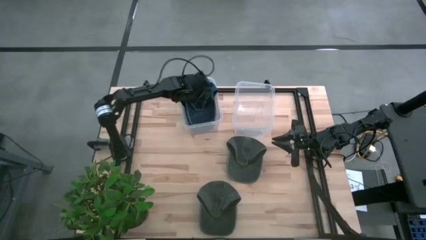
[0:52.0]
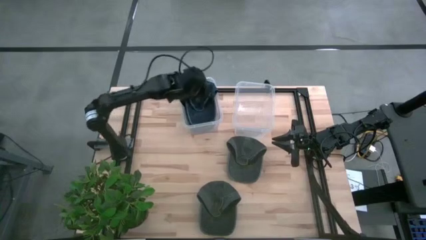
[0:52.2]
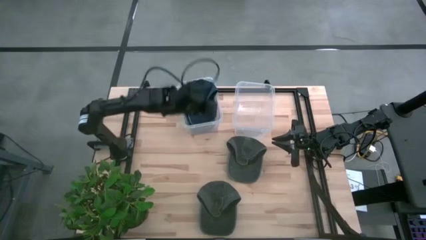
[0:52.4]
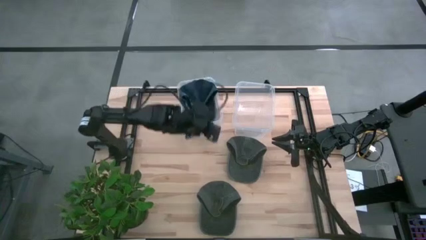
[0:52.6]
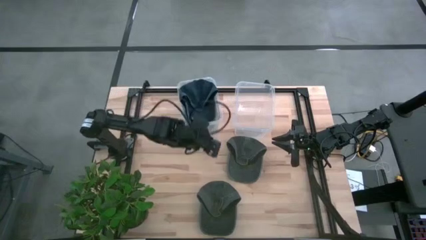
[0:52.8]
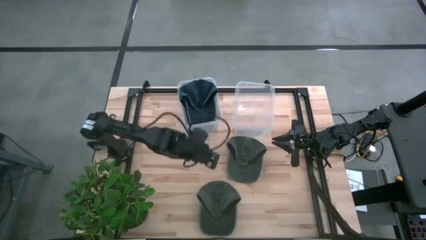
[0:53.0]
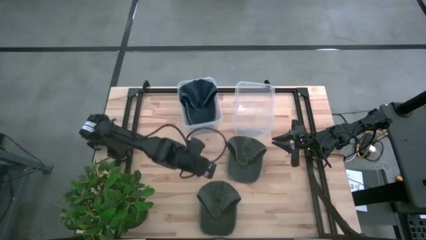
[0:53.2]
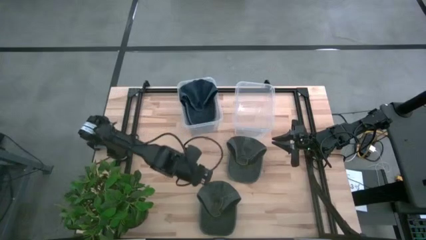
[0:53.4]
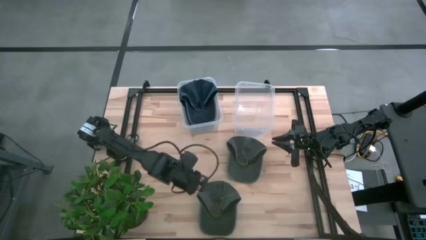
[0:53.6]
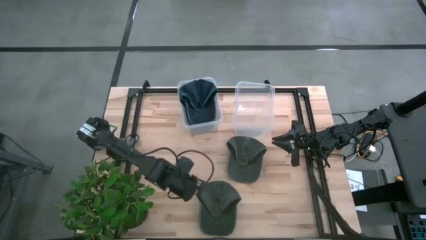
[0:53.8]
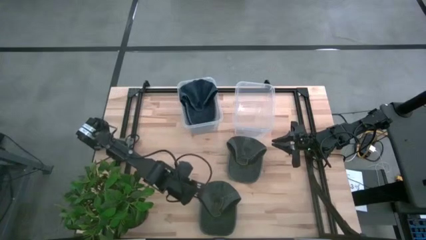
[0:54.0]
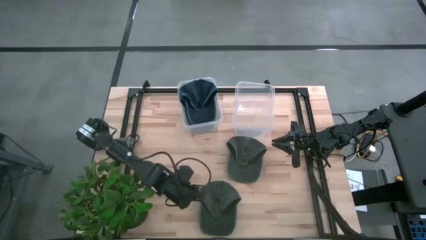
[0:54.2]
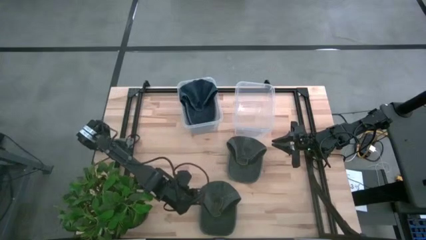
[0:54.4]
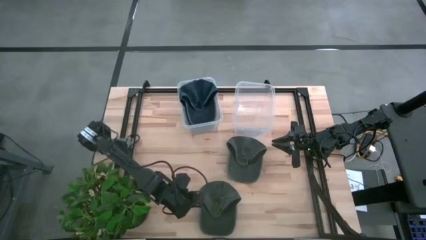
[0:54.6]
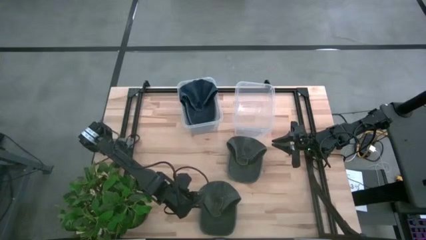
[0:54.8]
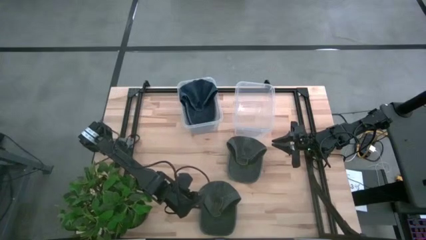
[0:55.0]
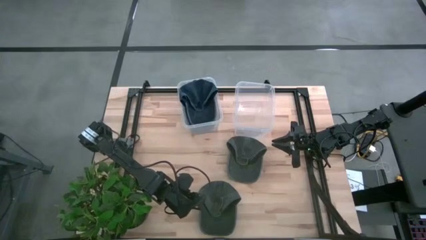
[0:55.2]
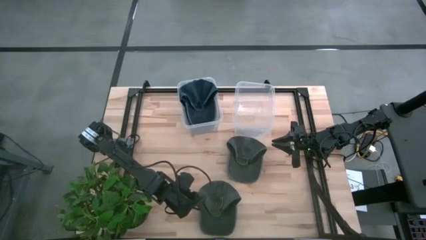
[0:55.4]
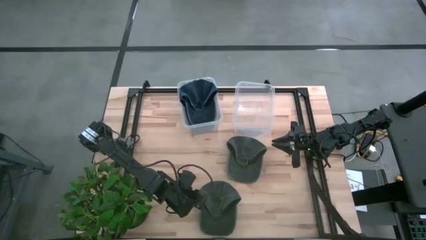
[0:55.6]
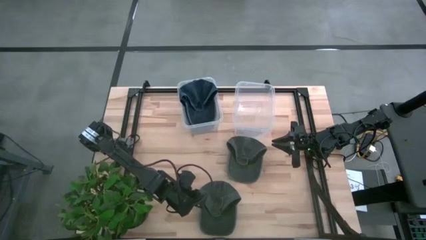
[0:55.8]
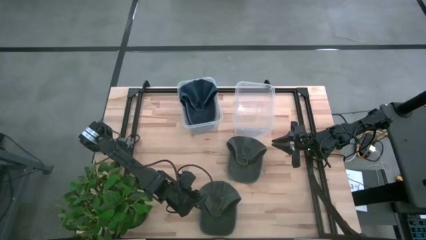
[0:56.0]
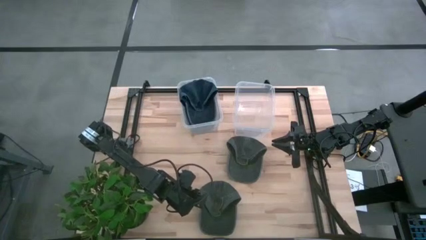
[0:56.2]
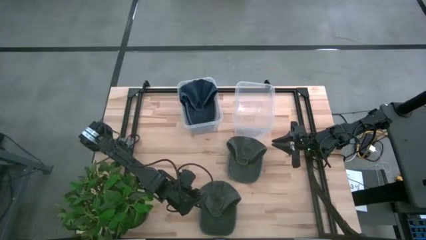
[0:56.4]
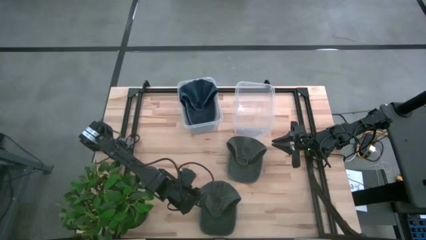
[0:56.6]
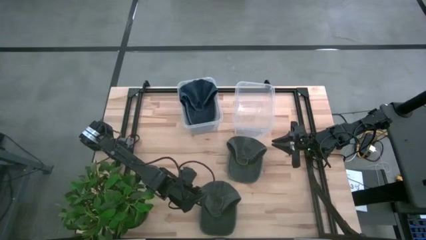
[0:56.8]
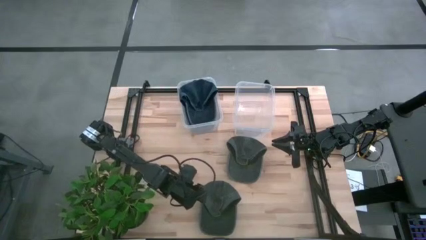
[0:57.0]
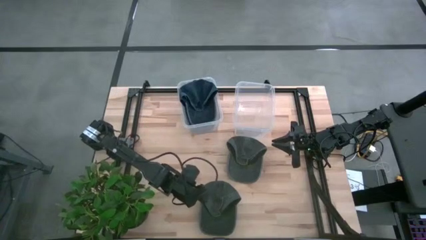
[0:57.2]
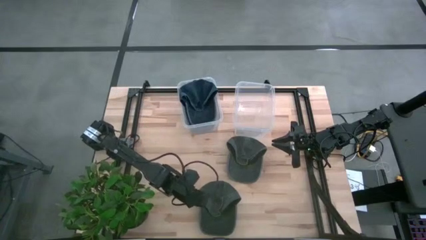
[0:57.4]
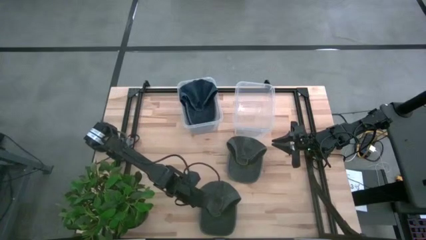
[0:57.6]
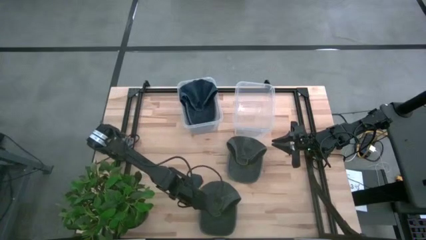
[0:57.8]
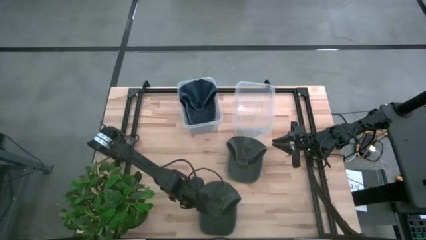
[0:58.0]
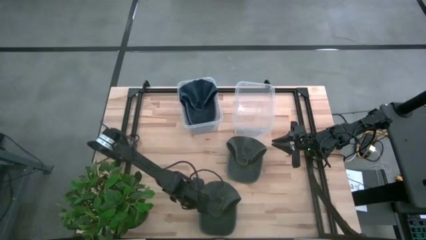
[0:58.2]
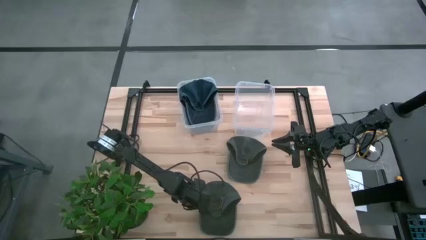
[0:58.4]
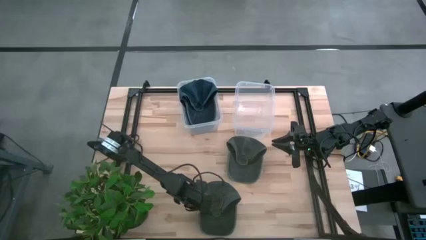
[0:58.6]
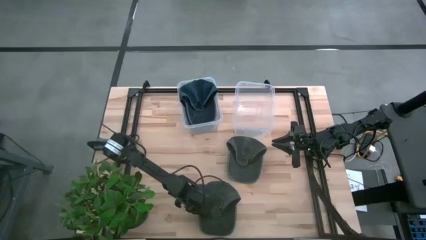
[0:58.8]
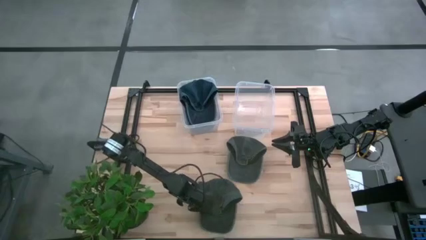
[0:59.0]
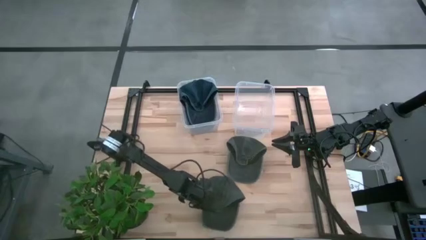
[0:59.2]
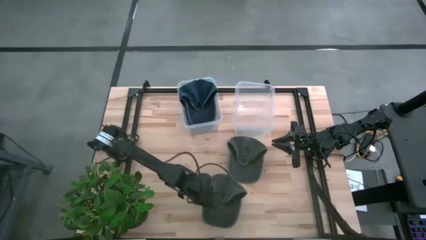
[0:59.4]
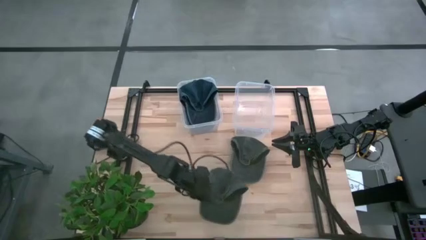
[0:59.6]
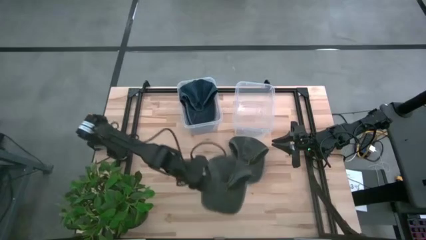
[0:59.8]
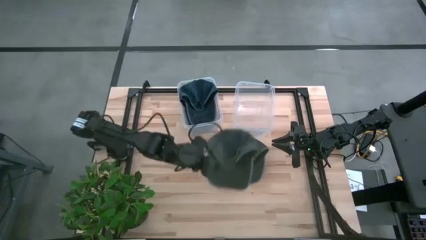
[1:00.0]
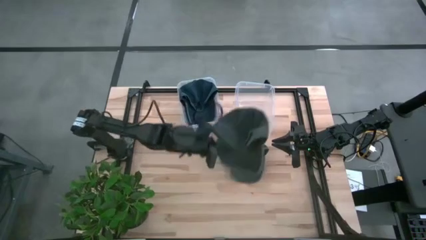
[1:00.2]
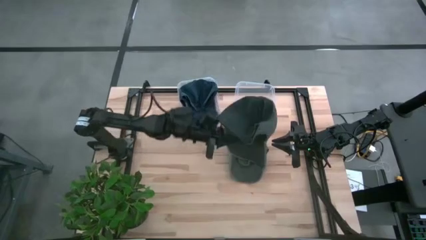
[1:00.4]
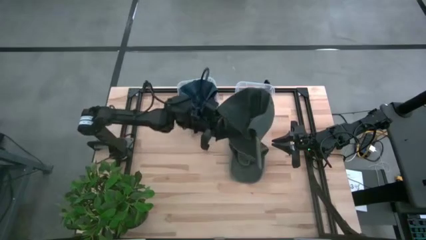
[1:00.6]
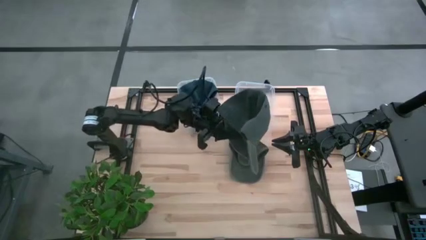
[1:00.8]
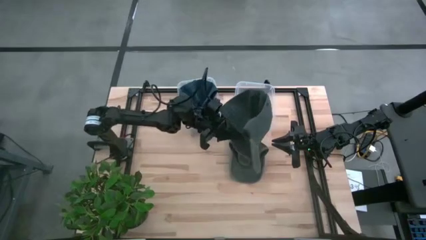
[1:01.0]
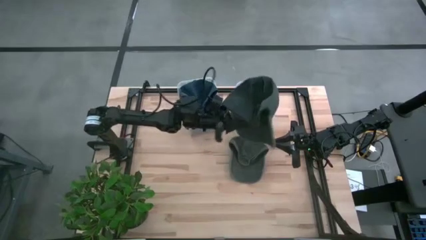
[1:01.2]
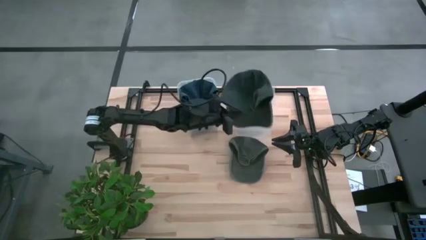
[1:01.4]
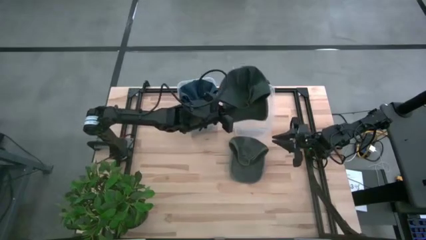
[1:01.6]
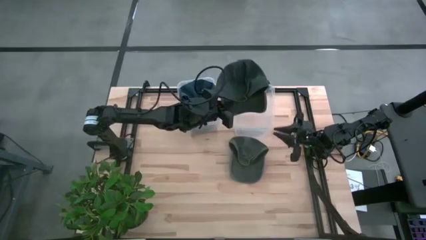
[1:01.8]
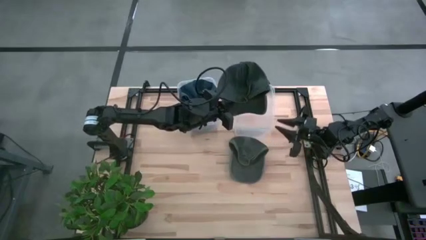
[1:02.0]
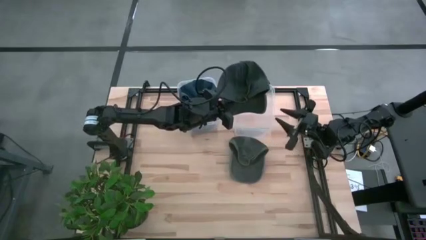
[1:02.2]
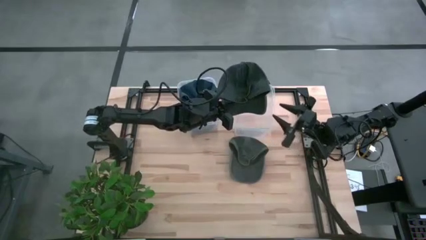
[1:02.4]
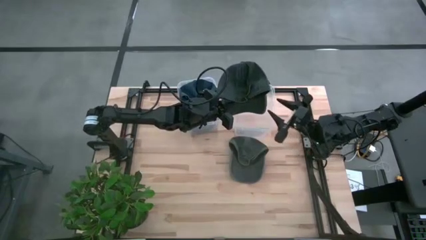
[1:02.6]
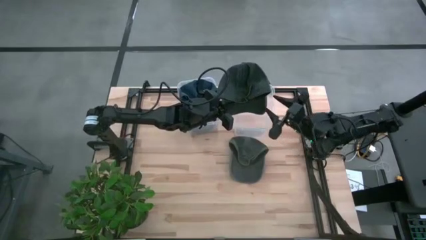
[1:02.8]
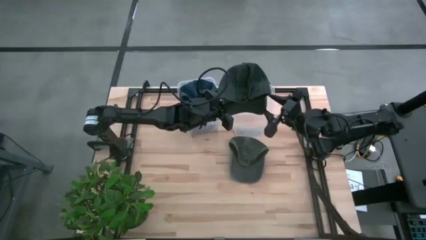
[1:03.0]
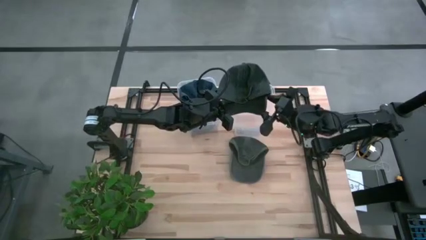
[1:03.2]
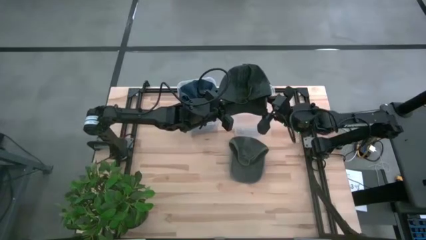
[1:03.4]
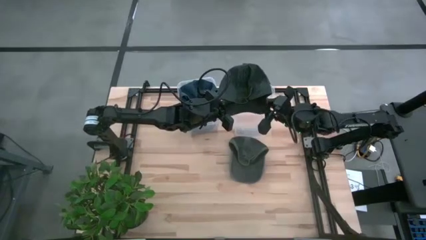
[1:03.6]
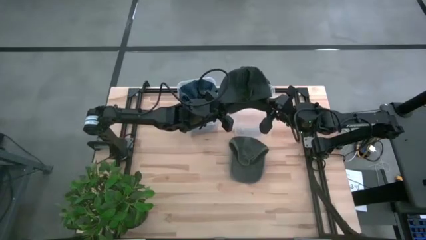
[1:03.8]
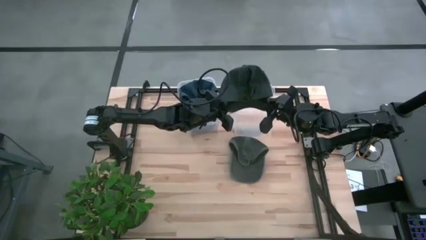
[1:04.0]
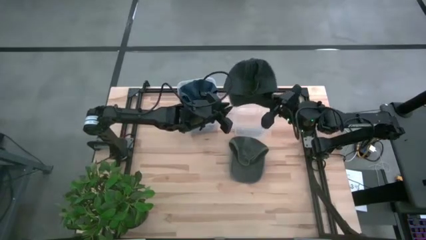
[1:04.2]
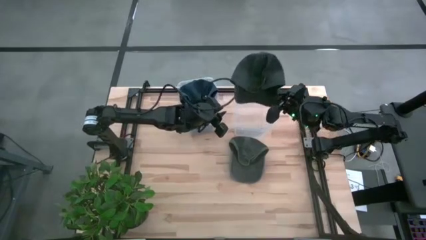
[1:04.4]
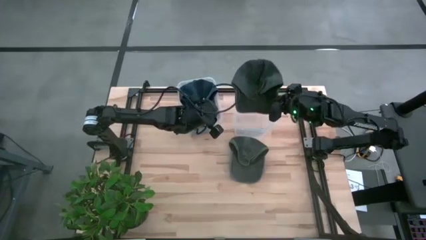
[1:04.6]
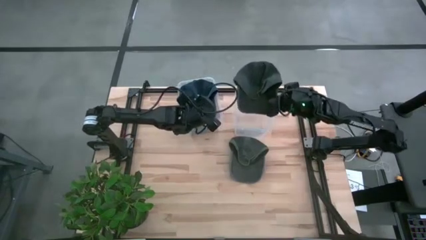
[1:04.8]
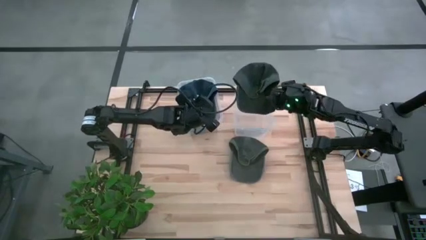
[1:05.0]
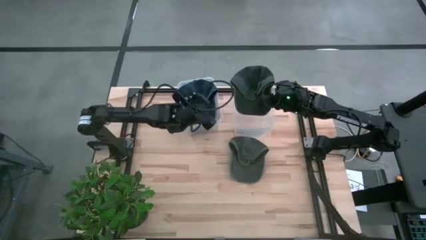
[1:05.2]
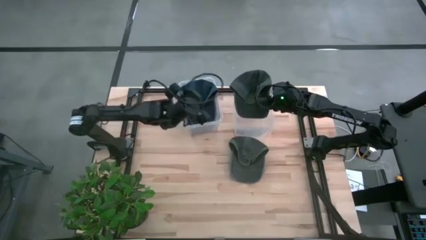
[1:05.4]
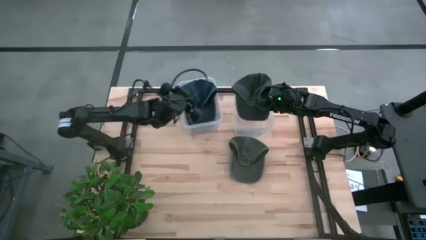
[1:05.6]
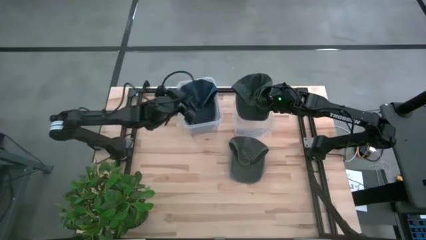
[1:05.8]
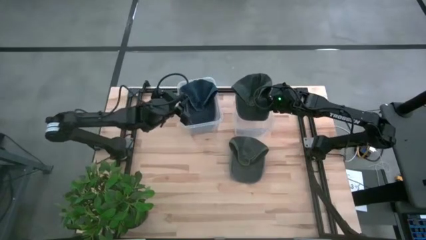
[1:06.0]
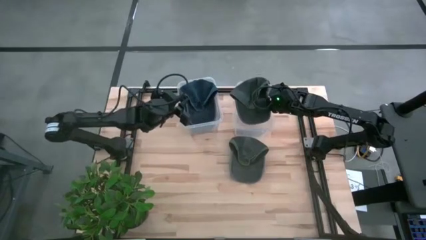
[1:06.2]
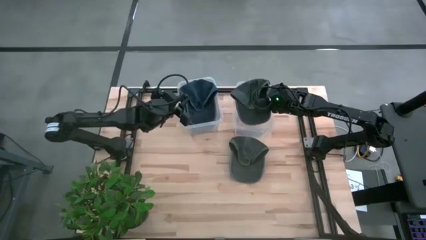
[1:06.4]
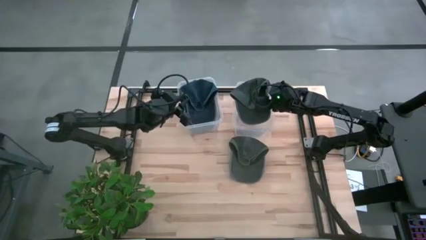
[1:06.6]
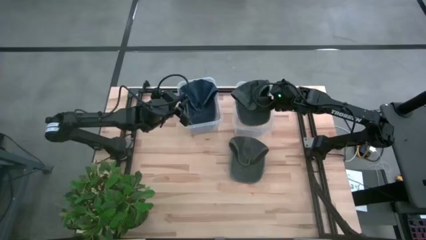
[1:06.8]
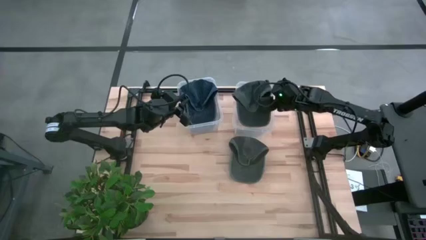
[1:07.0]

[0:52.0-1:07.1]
Task: Pick & Place hat
Put the bottom black cap into the right transparent bin
